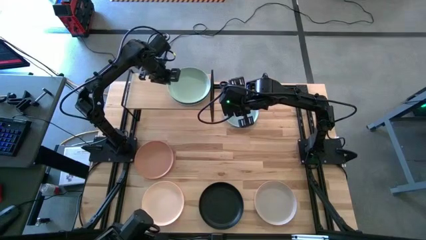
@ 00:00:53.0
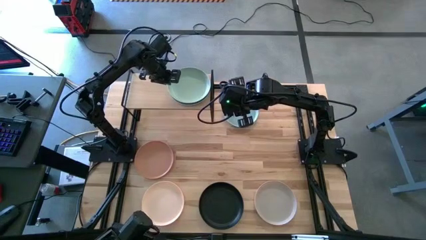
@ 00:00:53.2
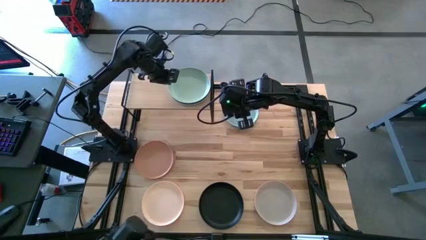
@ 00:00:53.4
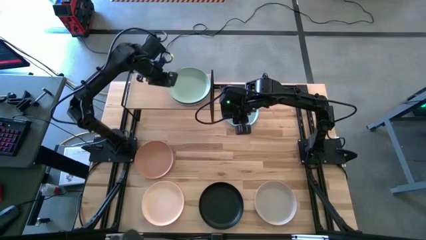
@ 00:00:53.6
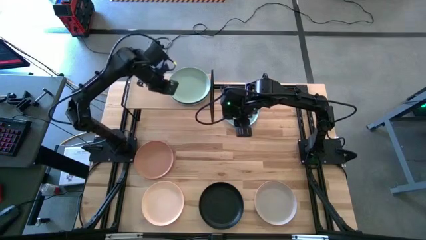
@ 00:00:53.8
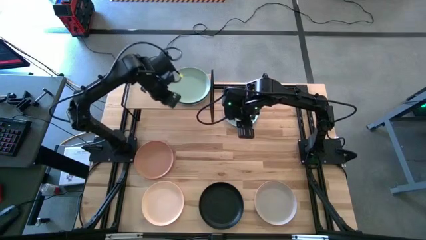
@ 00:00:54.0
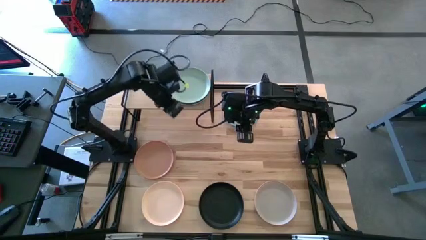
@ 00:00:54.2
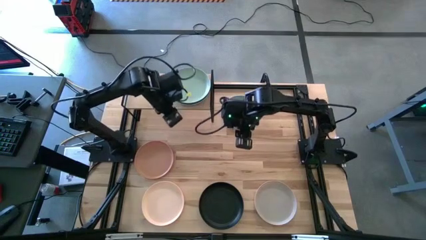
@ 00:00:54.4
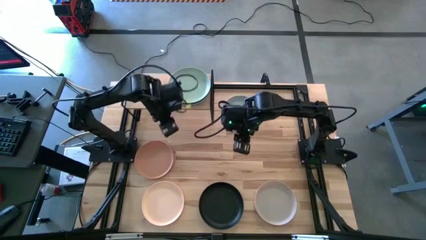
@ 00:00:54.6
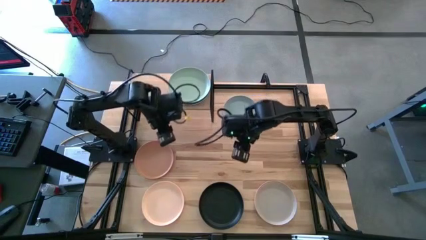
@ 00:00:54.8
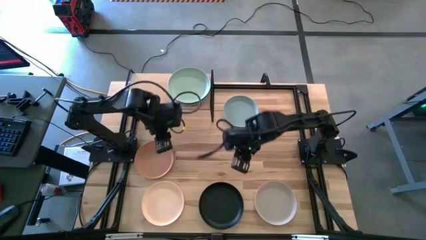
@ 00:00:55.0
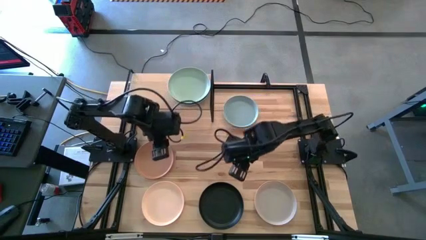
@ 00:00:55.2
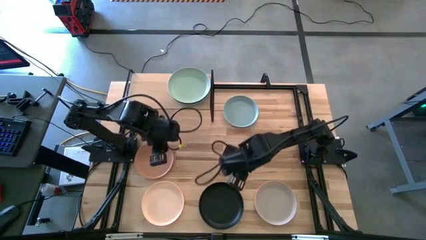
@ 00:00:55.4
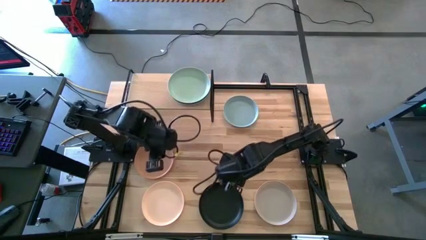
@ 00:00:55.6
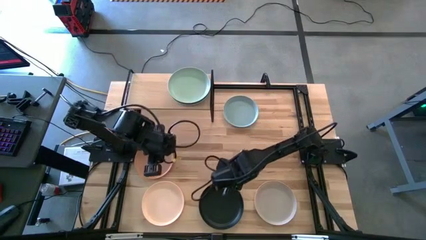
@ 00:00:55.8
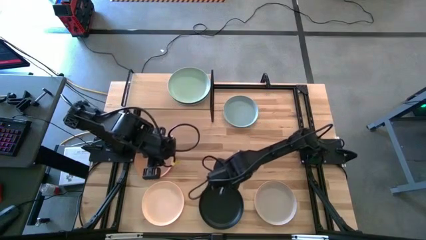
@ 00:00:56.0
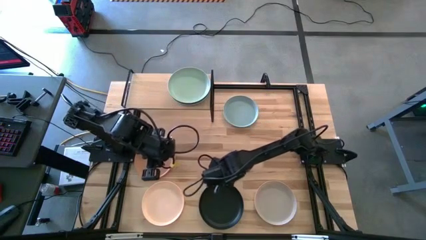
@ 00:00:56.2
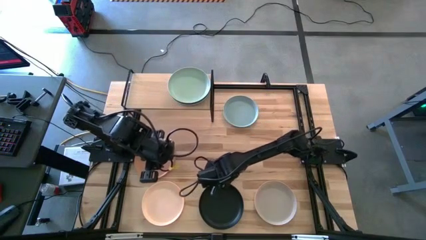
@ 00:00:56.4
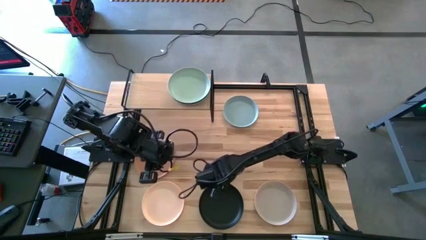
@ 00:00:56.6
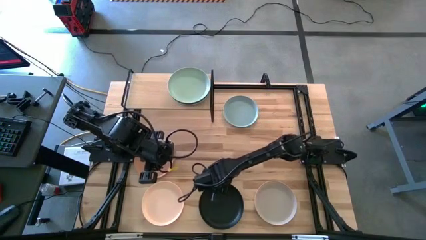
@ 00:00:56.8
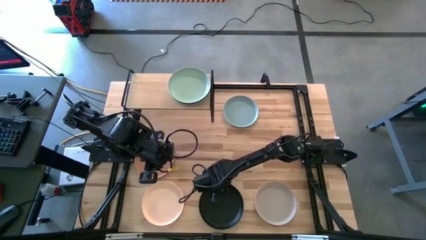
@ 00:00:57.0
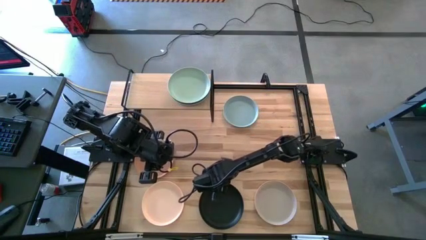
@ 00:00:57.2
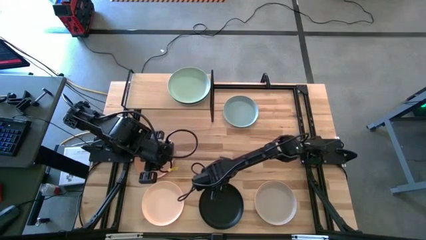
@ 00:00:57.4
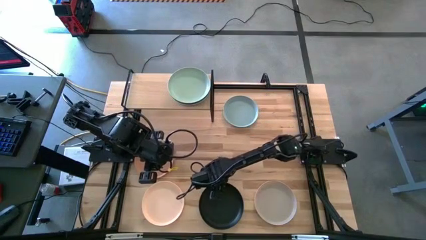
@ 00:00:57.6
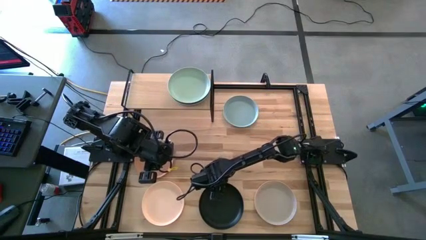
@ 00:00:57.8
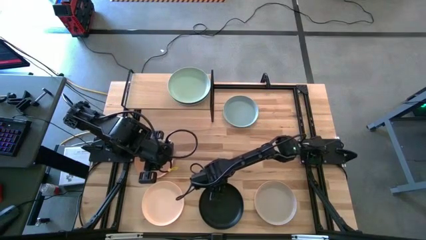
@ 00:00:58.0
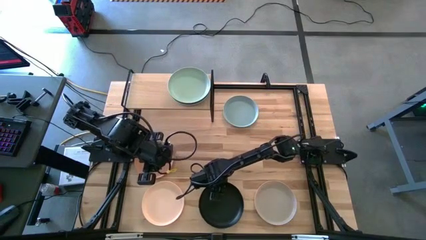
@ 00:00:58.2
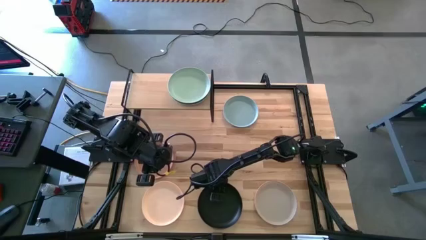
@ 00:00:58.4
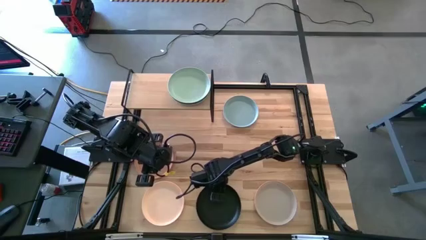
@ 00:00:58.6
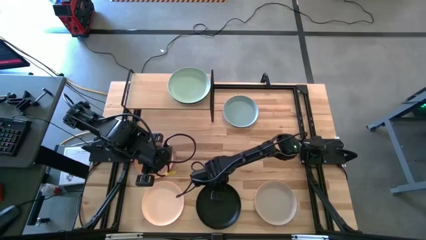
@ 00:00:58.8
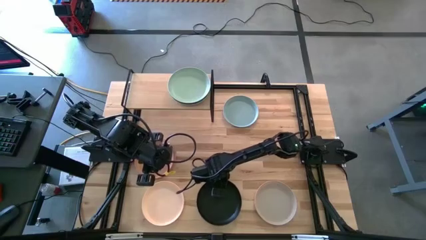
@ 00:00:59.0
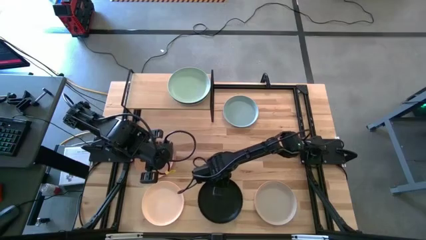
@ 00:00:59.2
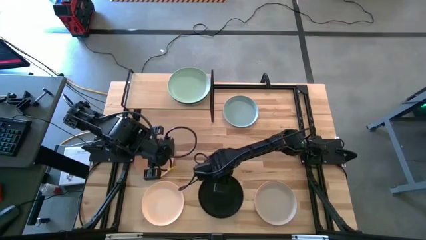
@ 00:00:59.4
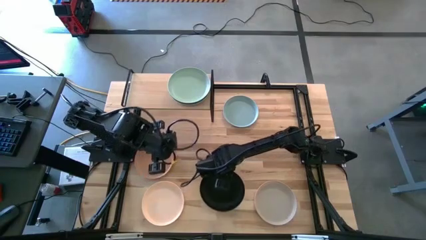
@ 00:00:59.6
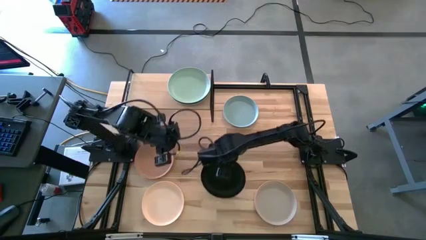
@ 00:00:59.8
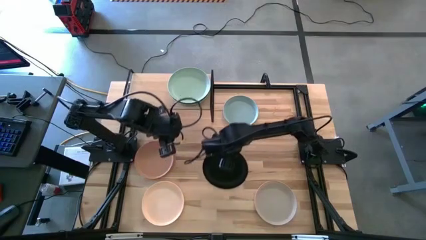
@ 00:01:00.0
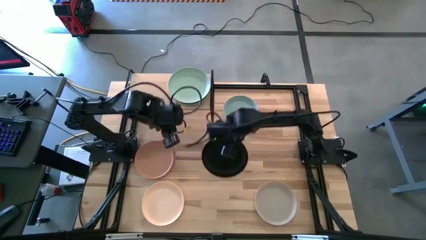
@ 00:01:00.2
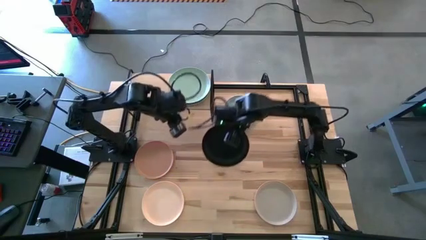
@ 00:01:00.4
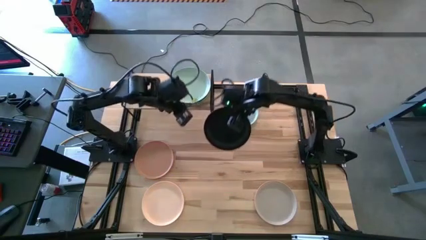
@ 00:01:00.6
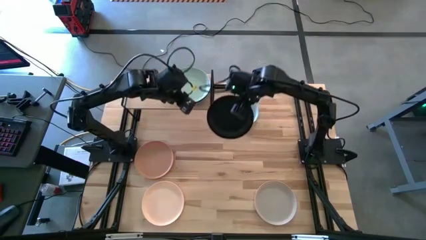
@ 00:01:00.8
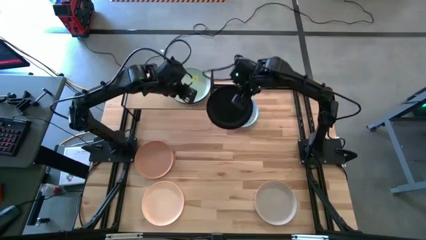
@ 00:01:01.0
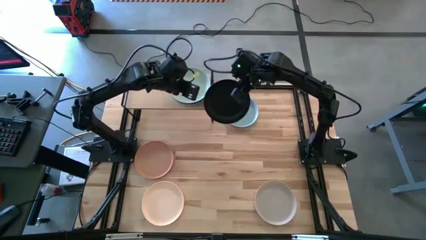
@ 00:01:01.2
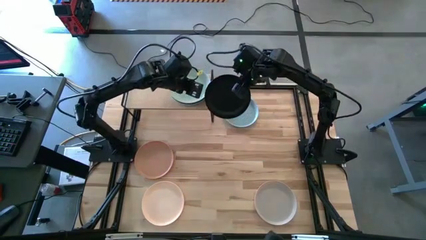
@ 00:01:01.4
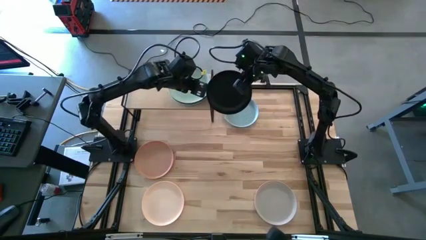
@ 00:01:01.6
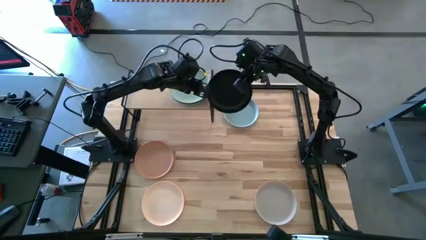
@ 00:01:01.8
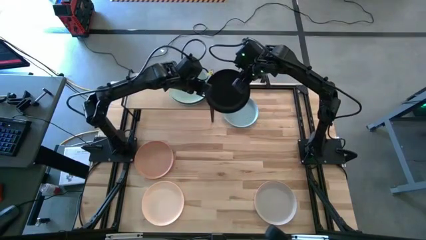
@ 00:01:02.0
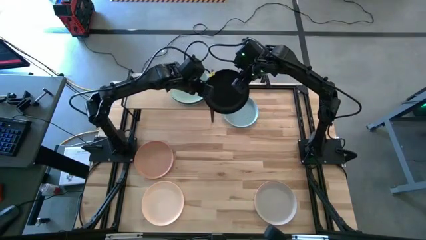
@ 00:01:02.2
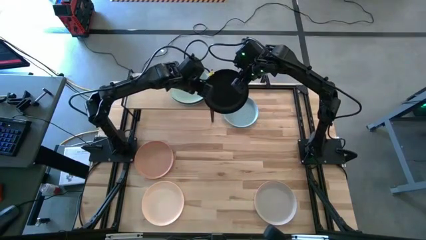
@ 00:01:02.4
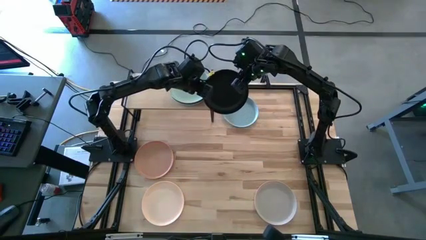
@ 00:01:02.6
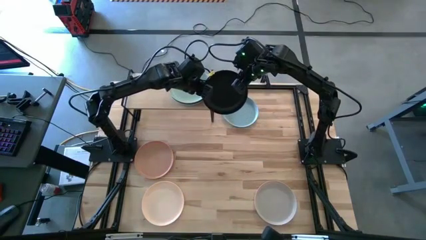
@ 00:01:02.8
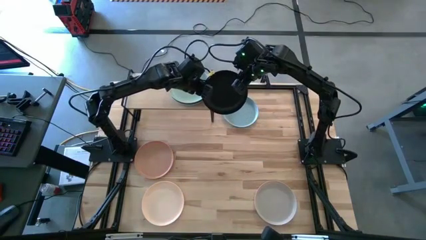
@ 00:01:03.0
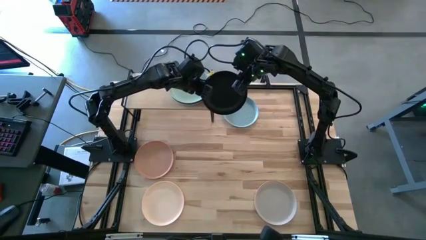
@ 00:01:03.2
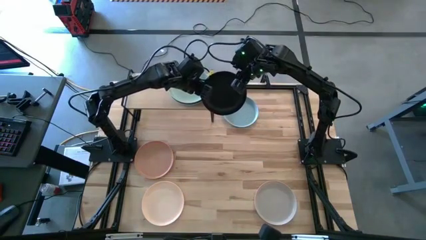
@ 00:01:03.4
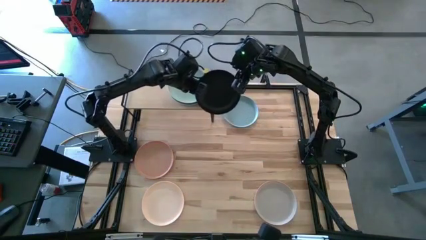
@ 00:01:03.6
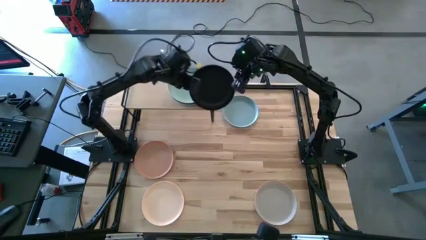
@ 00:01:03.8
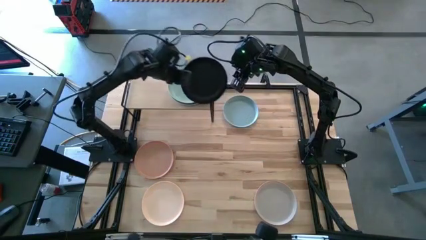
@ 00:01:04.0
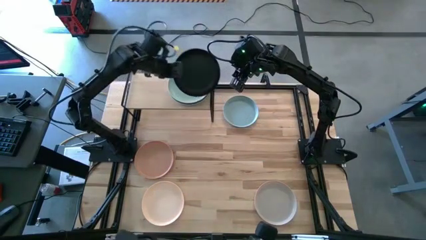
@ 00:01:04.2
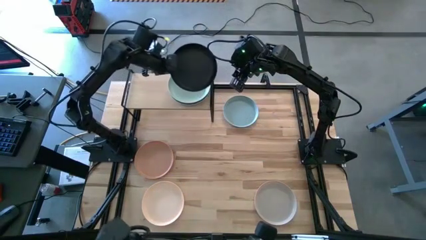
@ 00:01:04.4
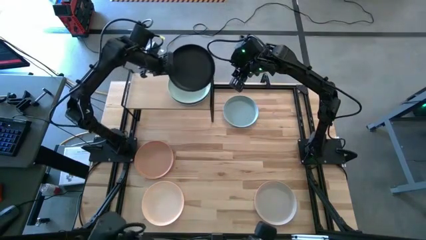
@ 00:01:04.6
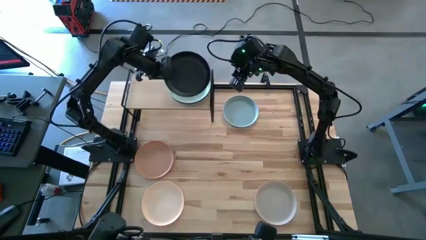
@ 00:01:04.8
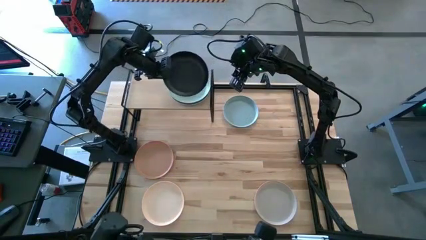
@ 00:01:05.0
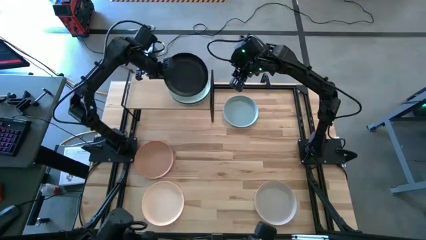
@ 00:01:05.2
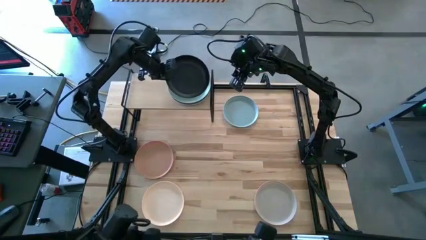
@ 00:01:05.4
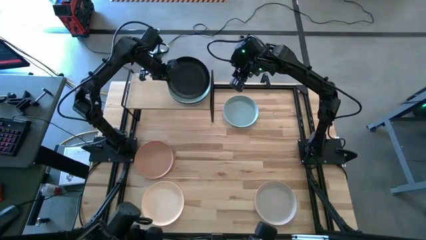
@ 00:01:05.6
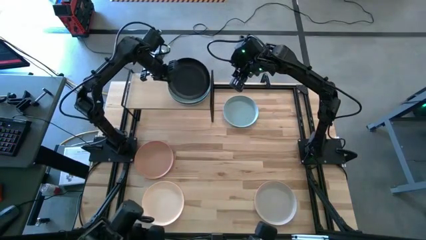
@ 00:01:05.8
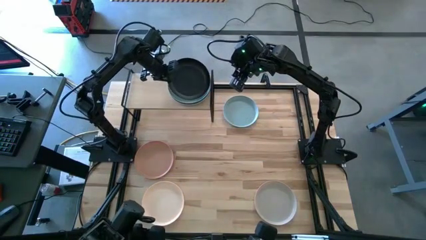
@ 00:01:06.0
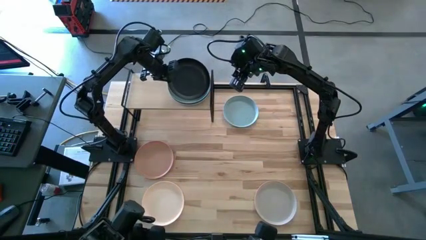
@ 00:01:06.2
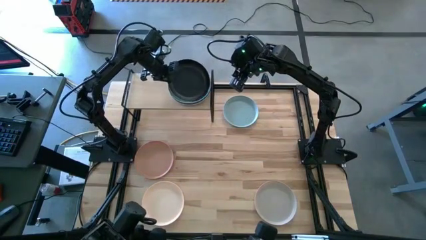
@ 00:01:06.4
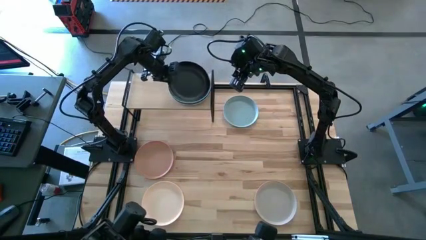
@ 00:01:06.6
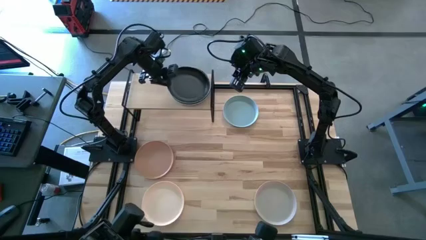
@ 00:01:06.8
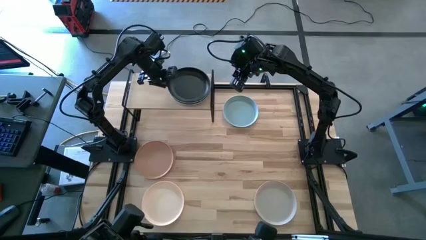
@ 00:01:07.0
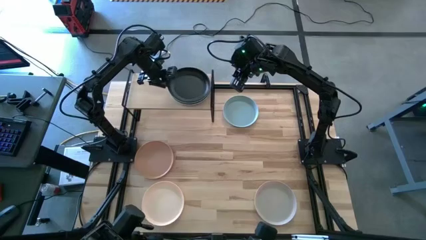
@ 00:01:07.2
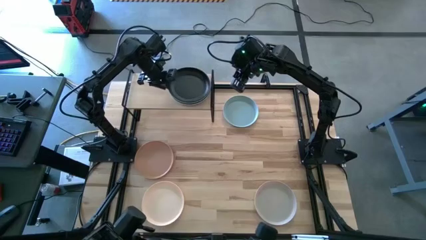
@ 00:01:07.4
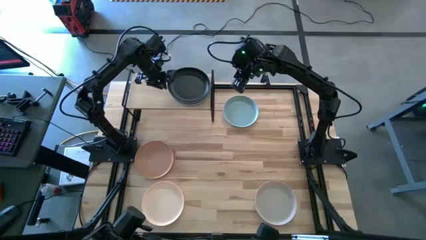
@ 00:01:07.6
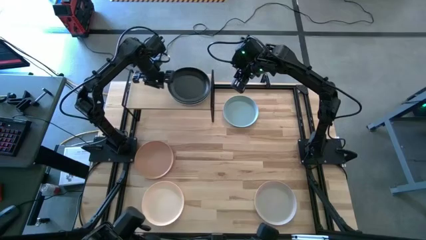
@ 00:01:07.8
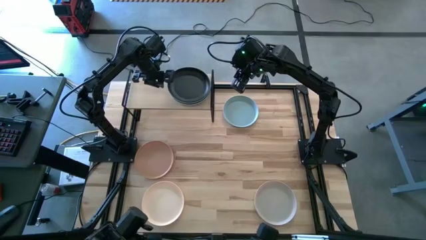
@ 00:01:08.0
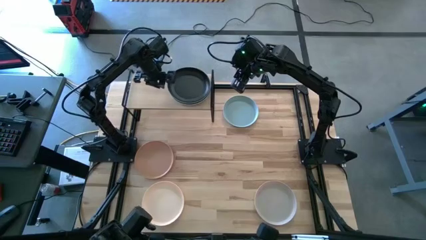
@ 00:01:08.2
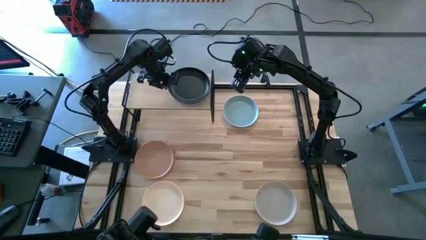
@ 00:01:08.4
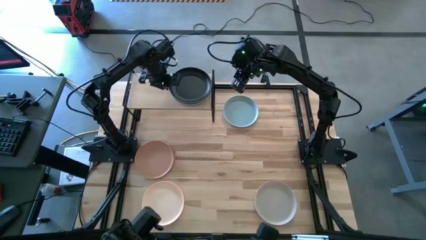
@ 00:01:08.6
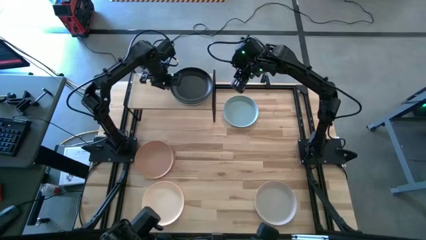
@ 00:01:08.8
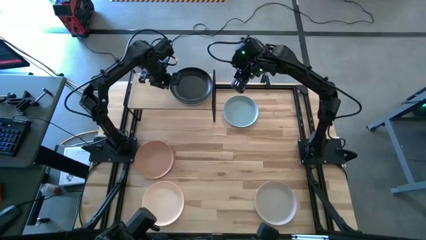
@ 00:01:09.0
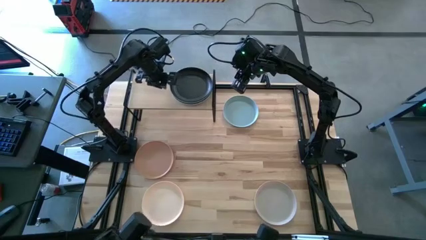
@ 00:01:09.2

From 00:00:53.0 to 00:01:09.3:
Task: Place and stack plates onto a shelf
Stack the black plate on top of the green plate on the shelf
